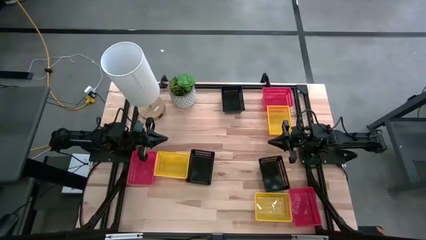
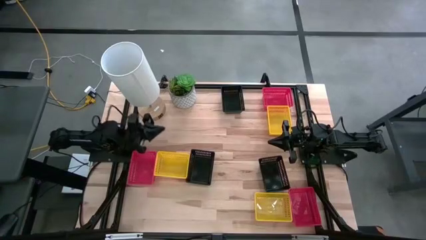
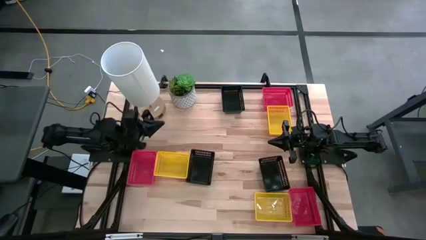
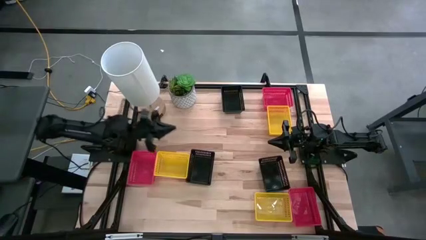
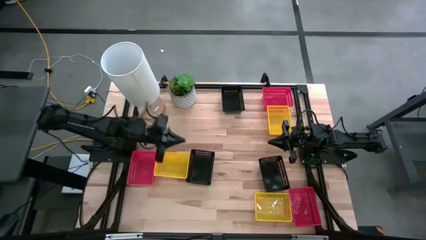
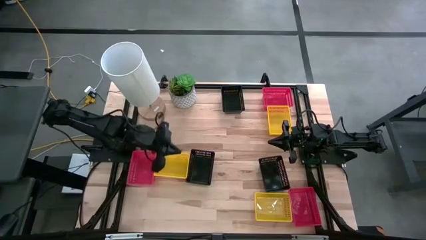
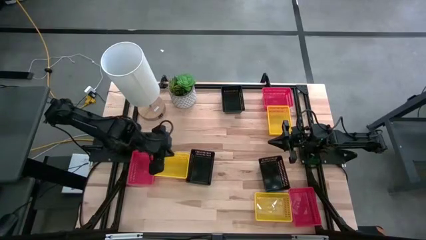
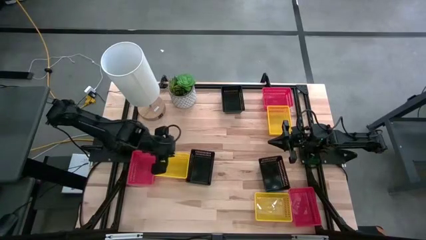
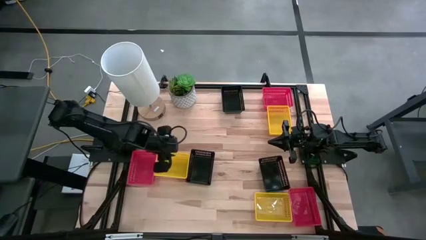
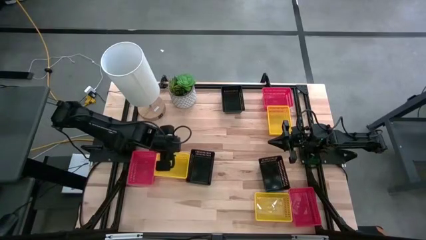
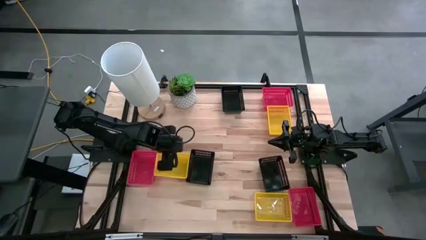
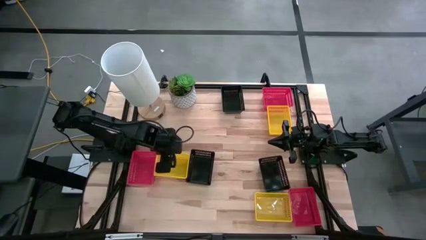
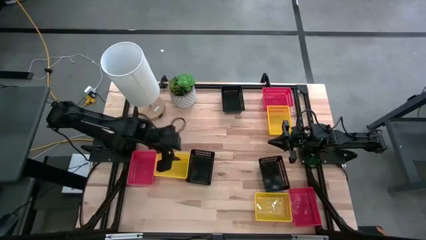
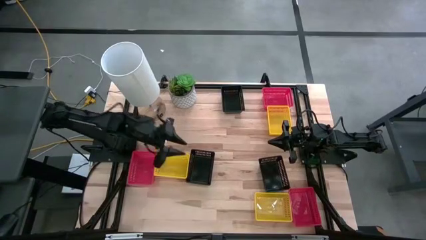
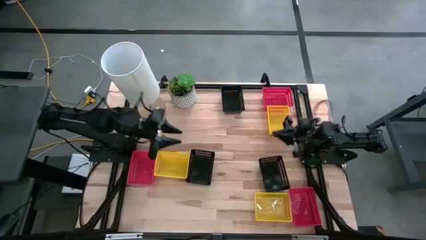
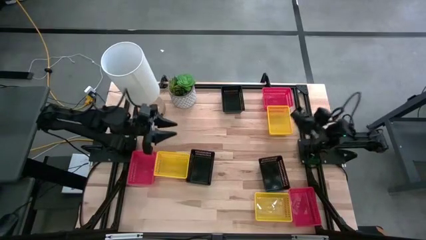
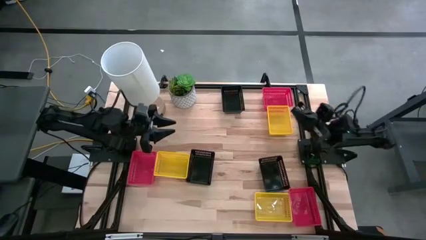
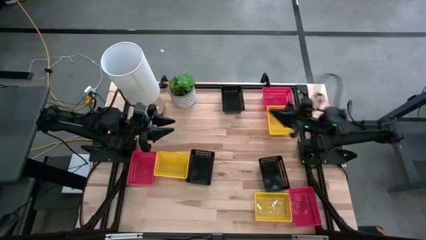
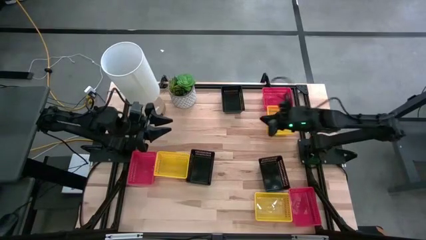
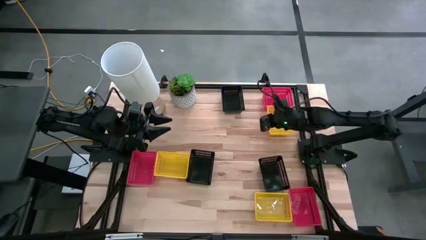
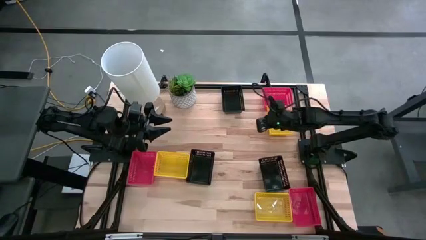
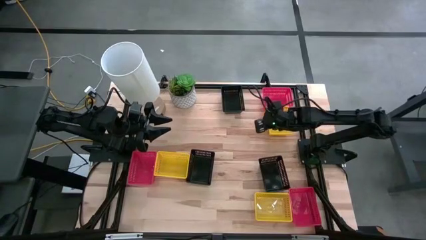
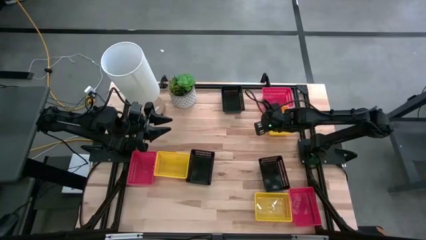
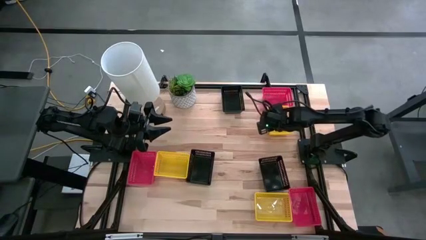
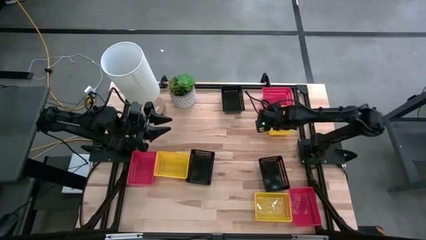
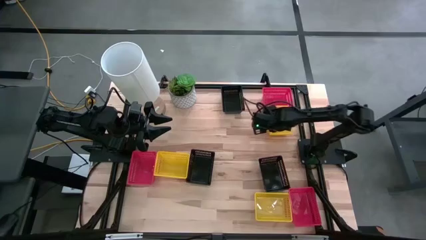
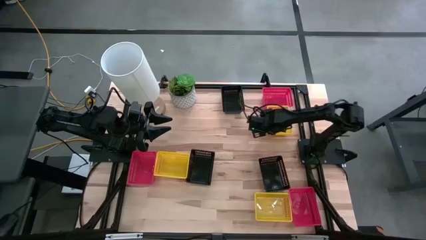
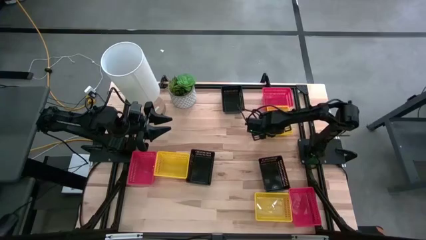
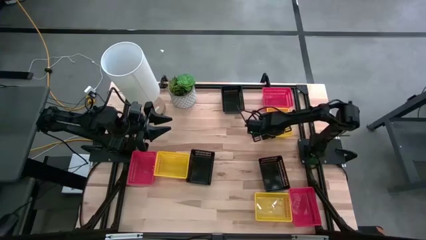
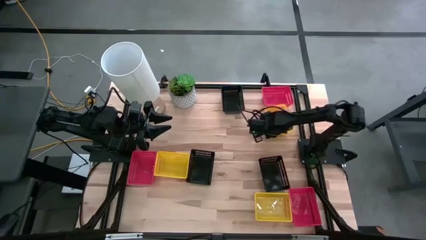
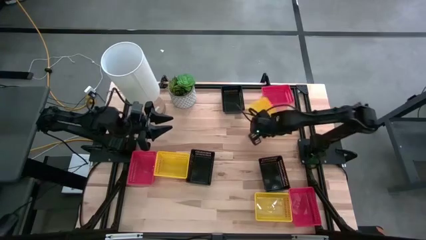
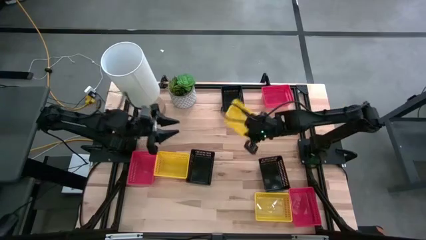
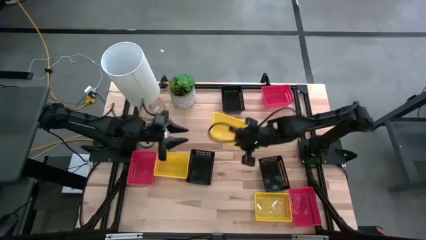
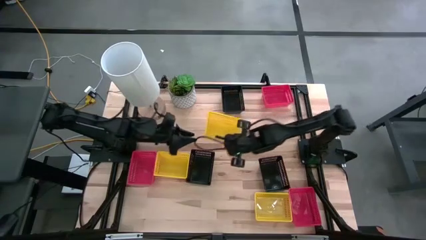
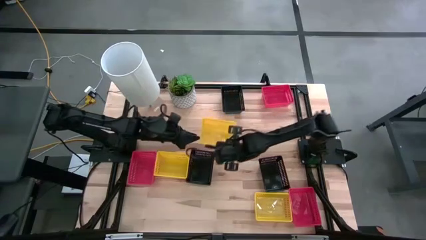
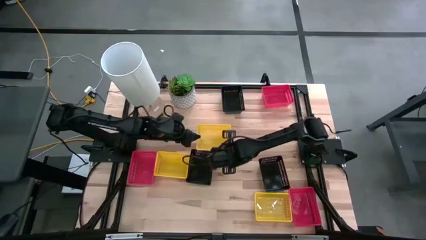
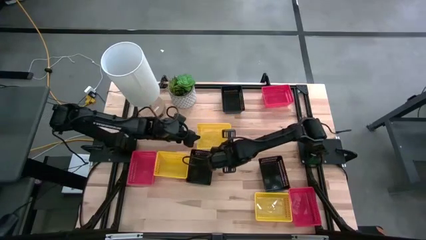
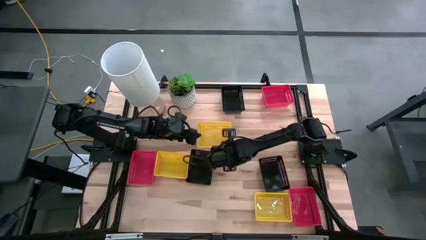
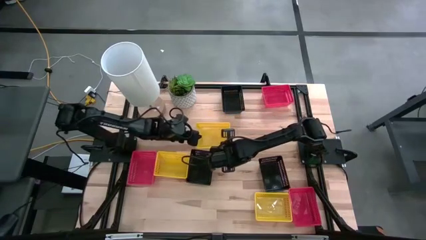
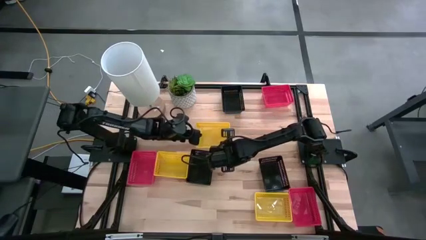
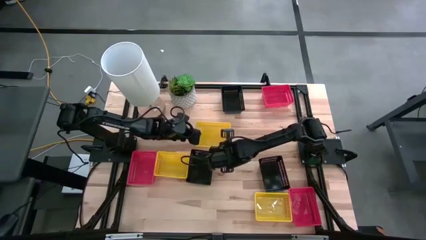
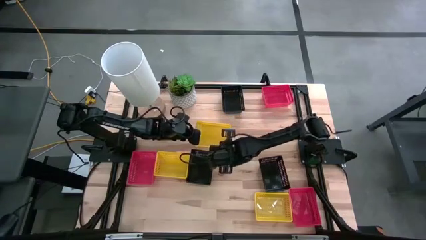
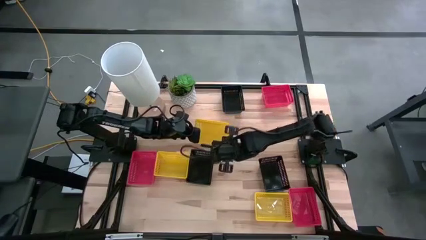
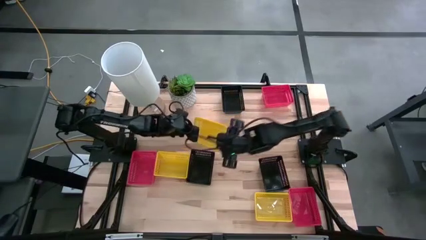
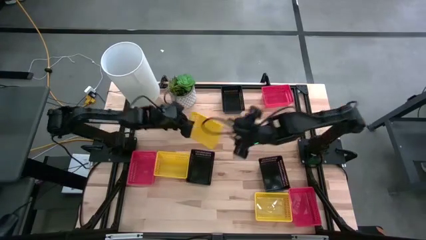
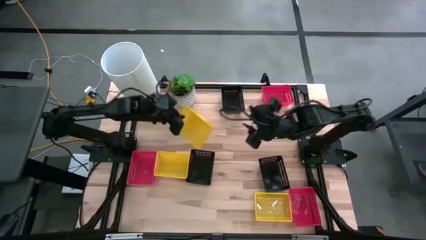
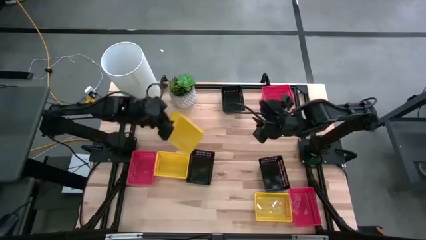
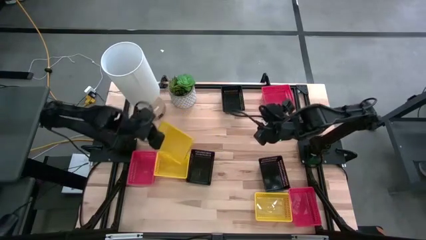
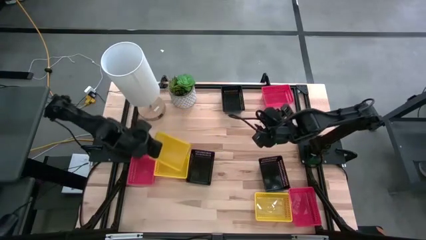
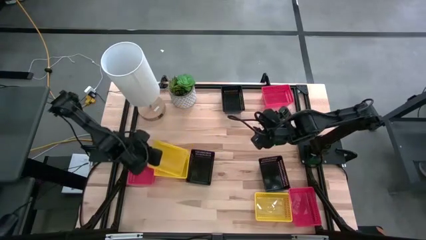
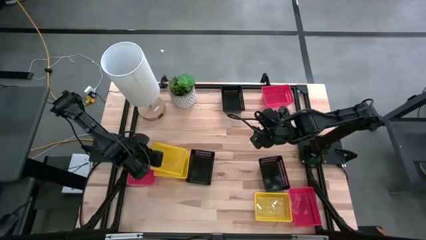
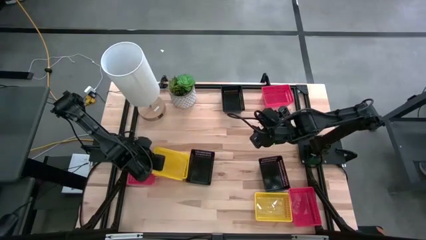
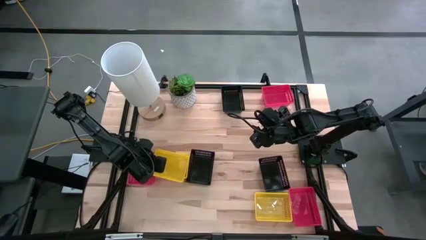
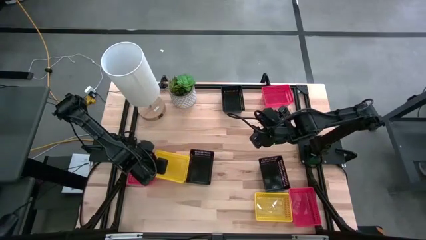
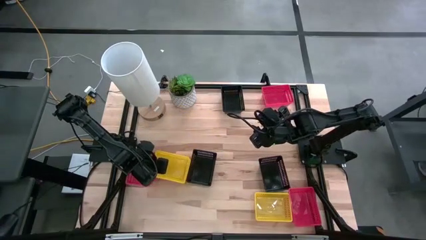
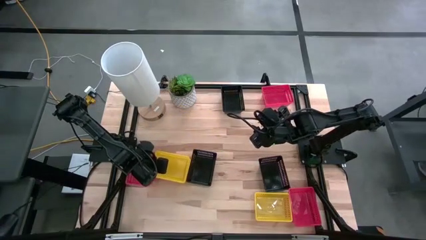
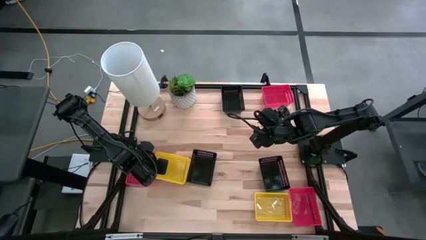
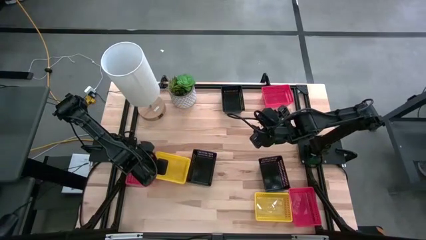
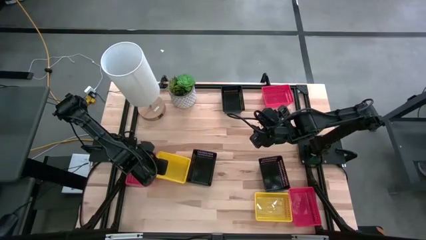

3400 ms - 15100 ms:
Stack the top yellow bin on the middle yellow bin

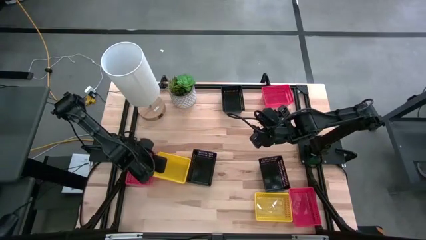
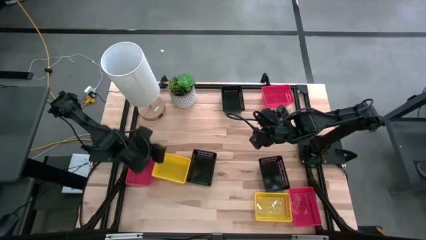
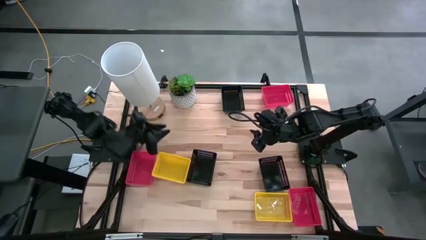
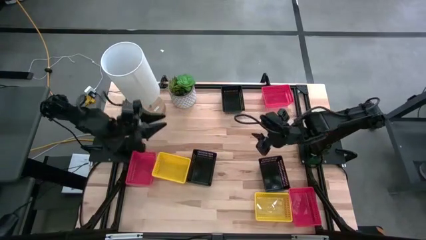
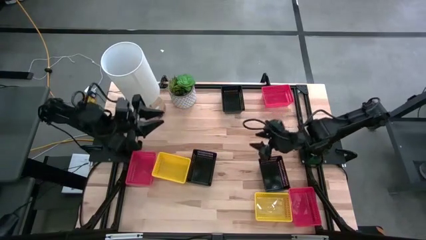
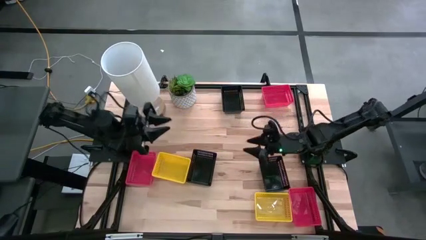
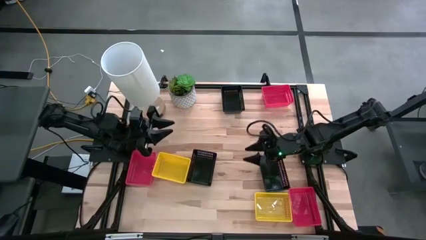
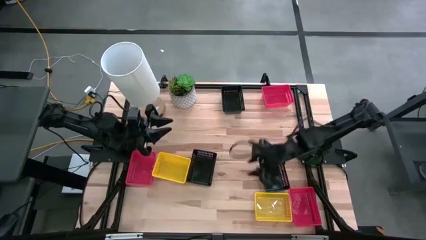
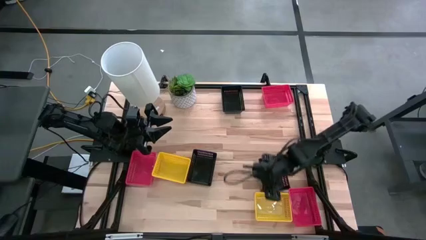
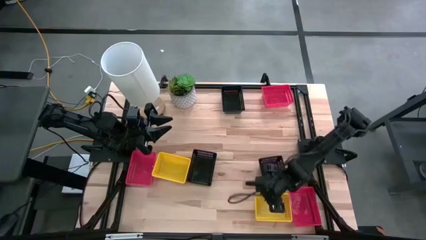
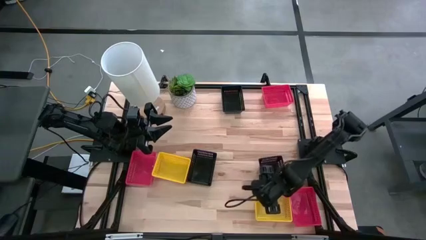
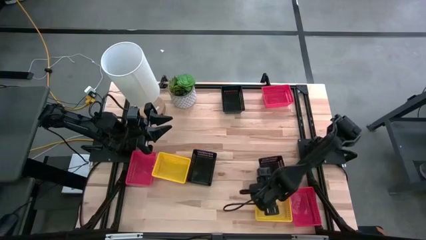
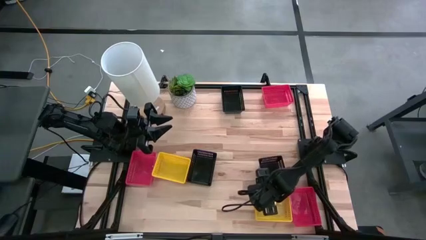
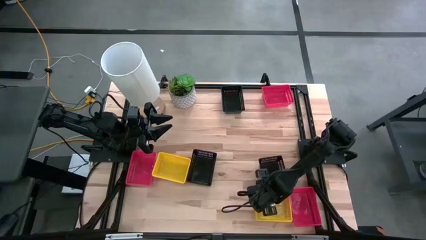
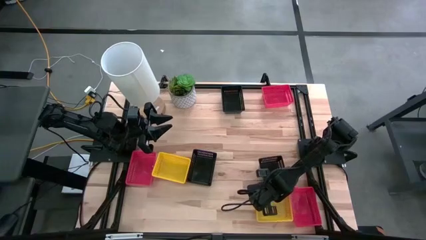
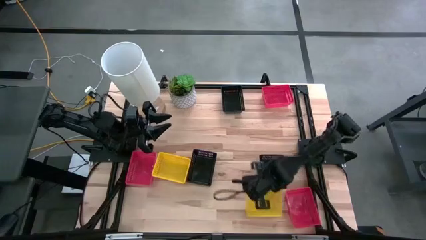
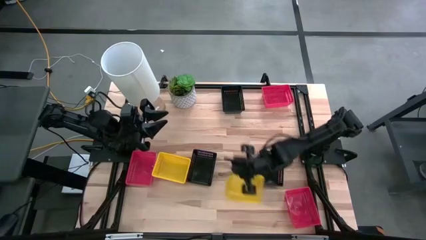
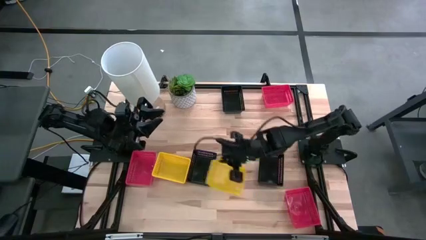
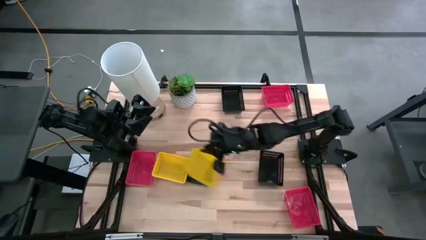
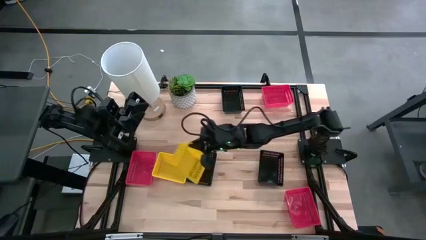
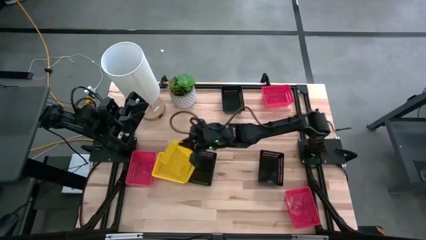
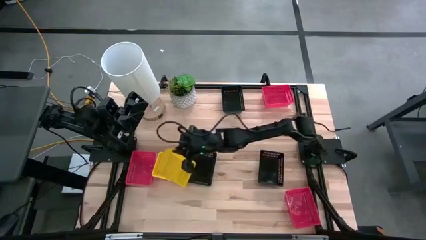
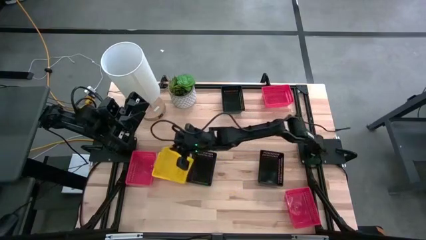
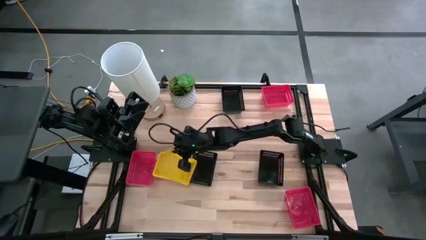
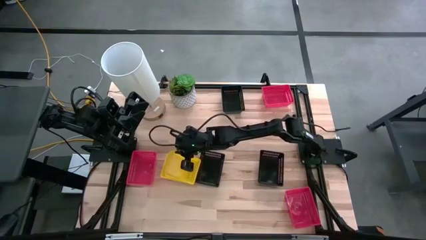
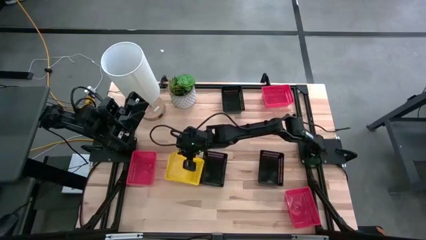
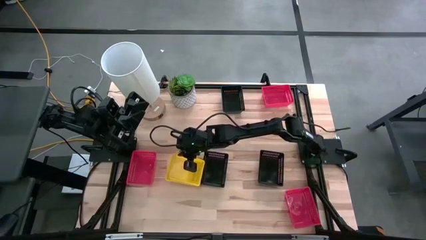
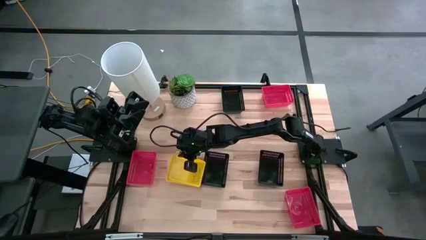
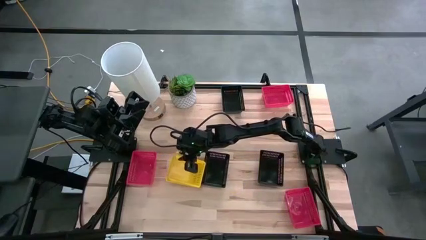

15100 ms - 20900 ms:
Stack the bottom yellow bin on the top yellow bin
